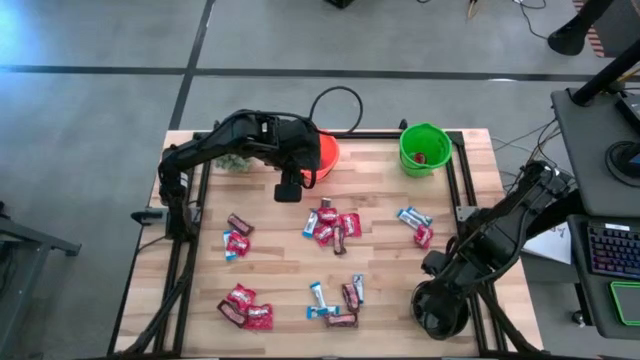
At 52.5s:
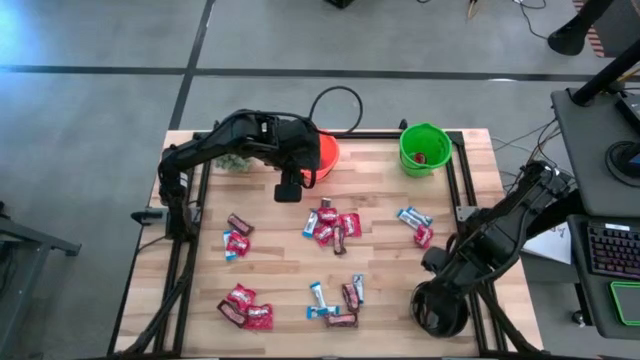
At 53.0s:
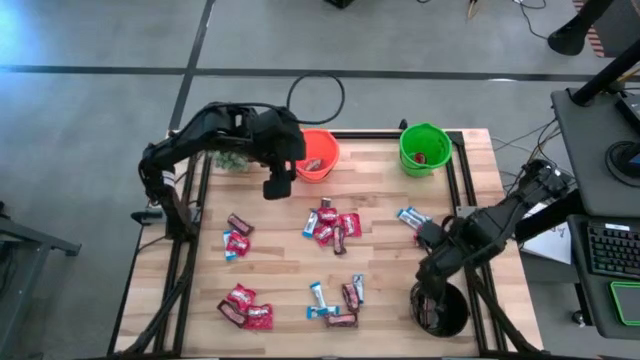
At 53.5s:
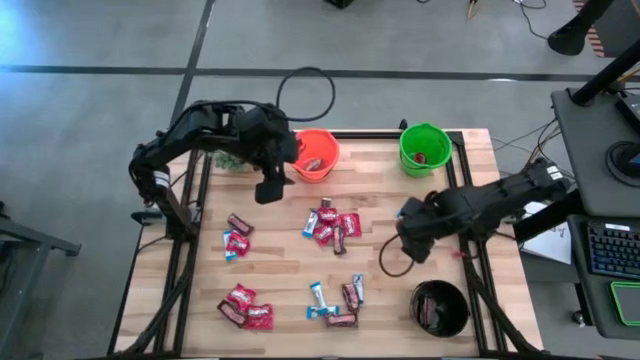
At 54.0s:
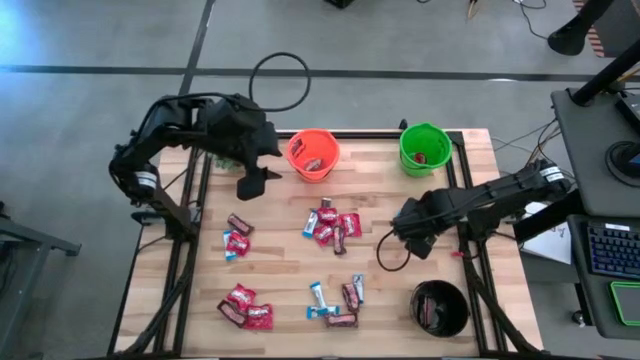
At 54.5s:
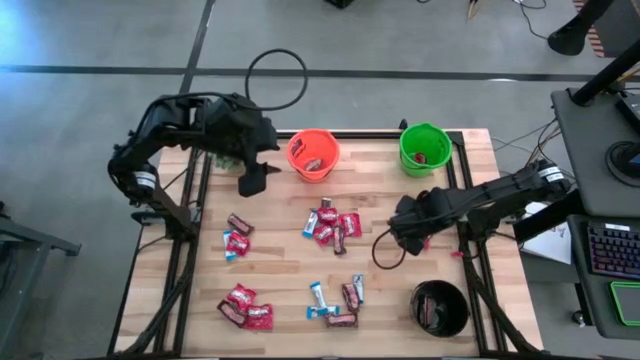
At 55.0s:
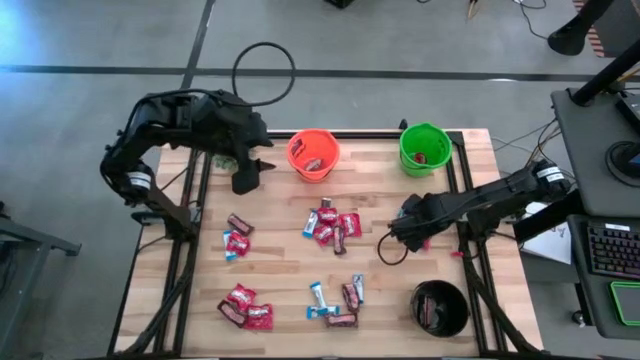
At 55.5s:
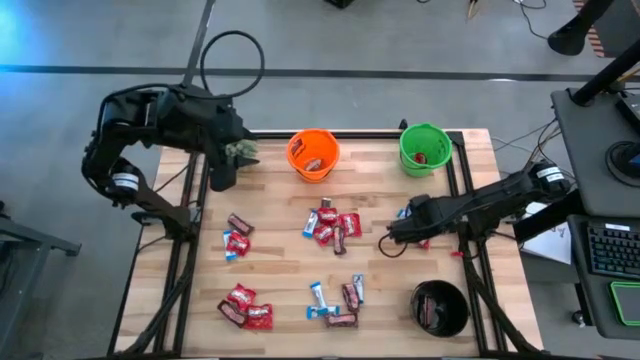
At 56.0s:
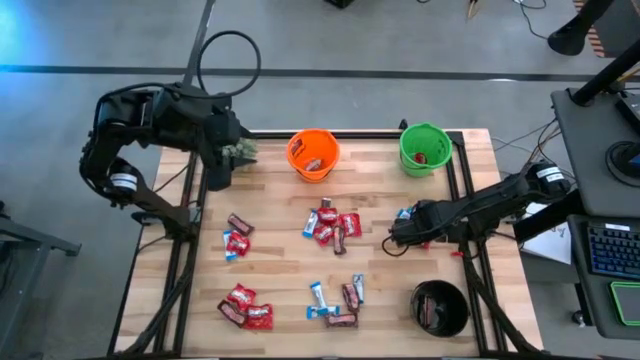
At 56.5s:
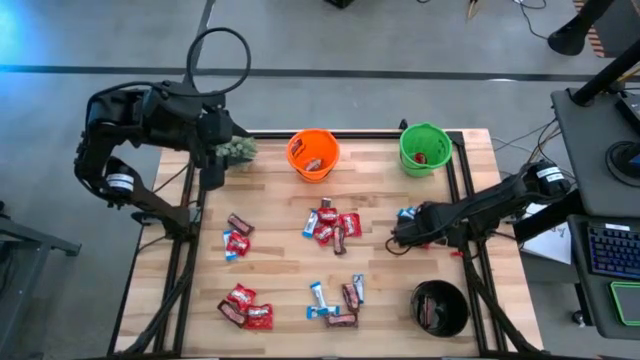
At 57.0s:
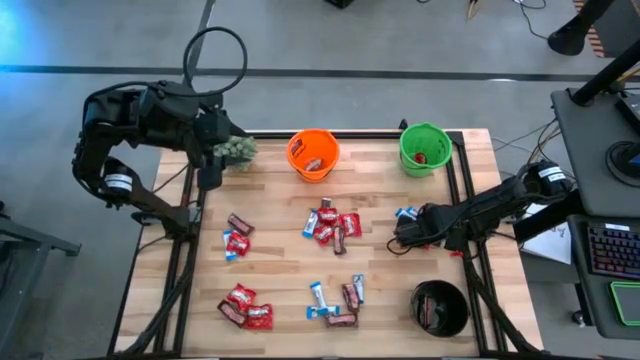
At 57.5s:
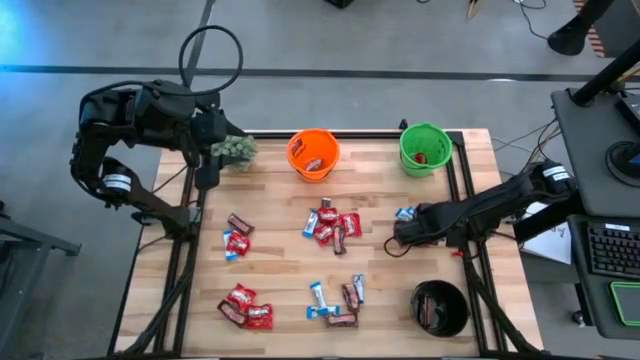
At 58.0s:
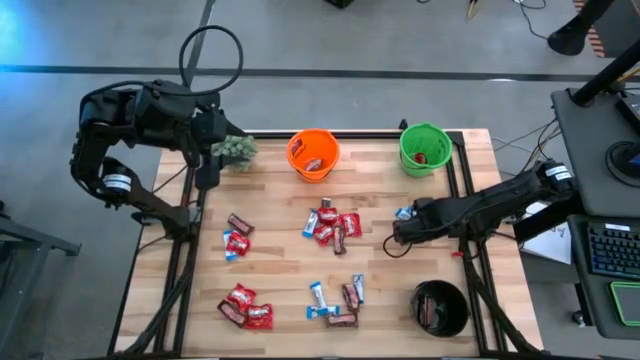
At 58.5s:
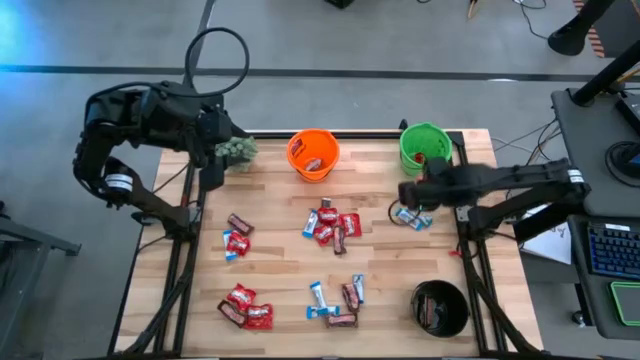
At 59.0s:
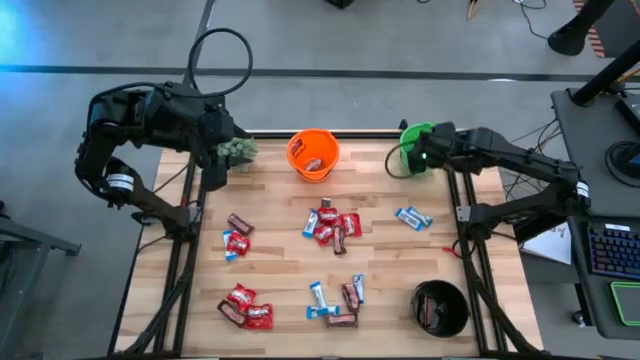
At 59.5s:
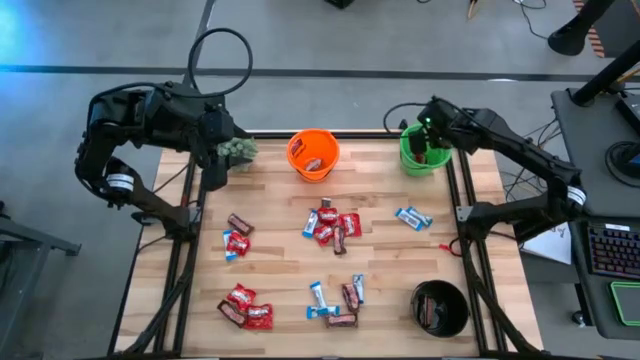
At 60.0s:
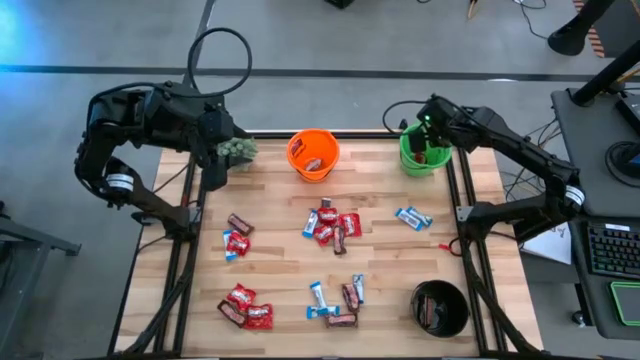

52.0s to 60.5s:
Task: Sort candy
Put the red candy into the green bucket

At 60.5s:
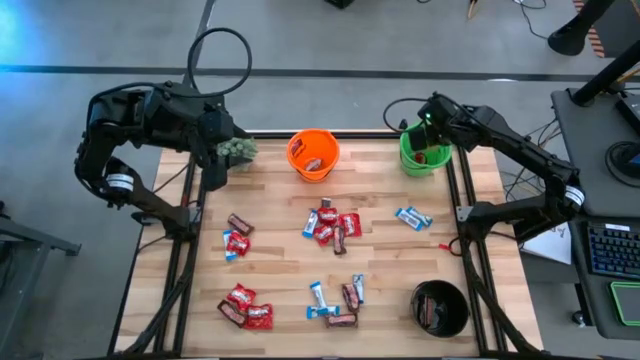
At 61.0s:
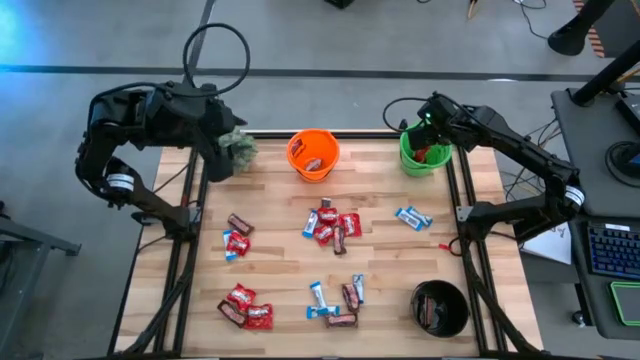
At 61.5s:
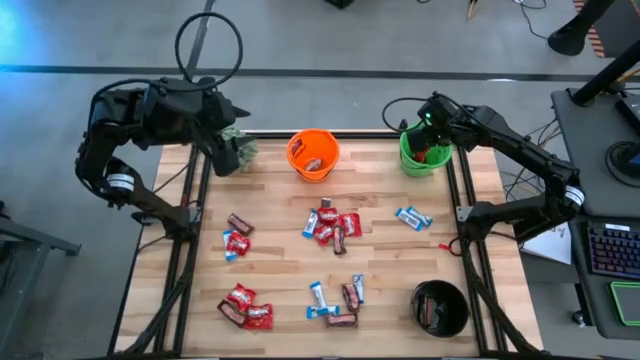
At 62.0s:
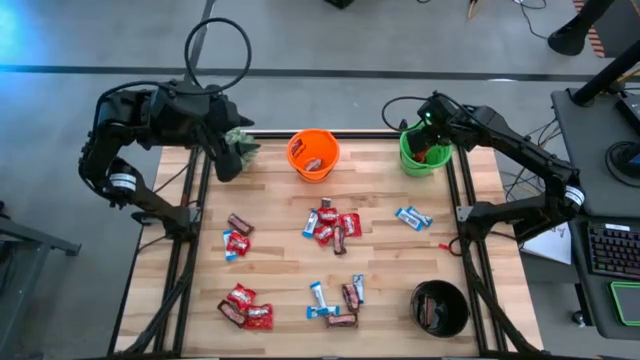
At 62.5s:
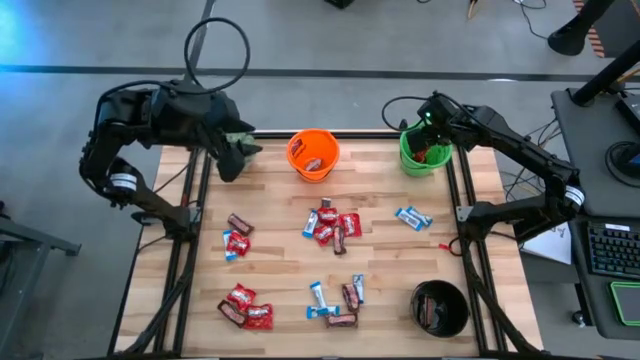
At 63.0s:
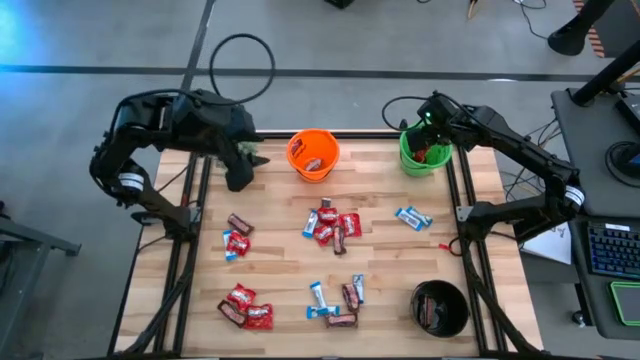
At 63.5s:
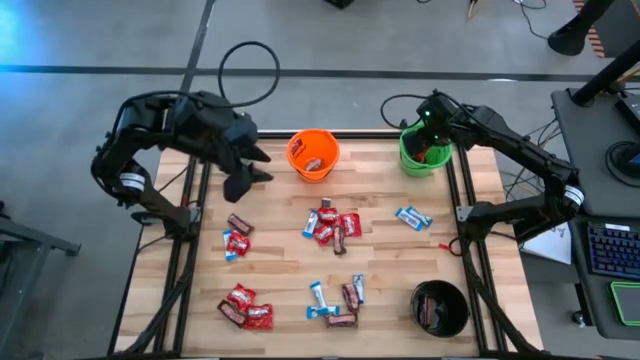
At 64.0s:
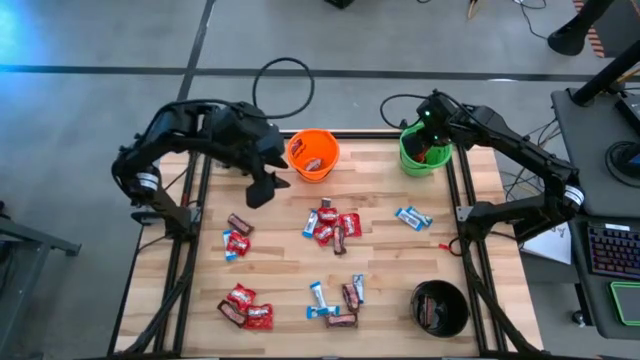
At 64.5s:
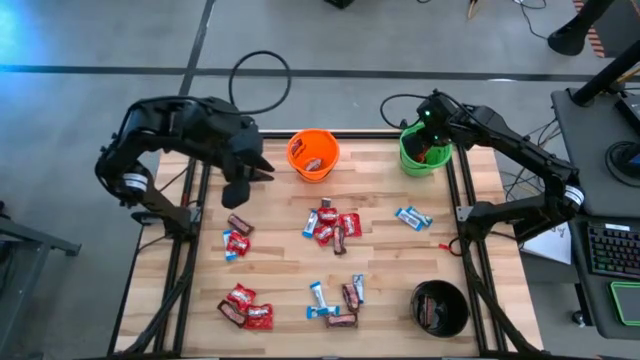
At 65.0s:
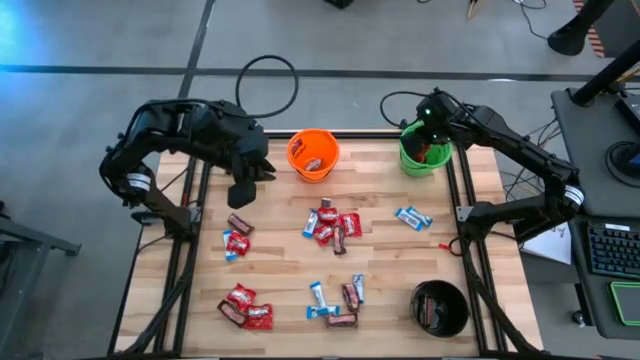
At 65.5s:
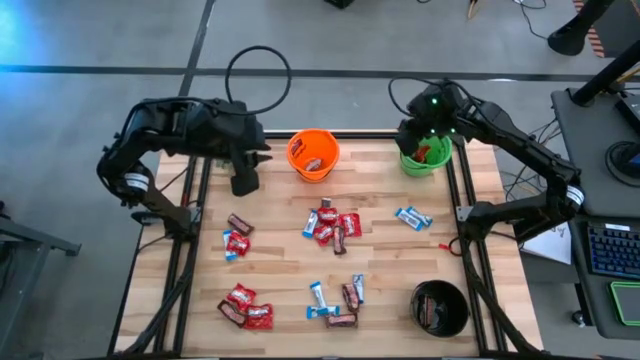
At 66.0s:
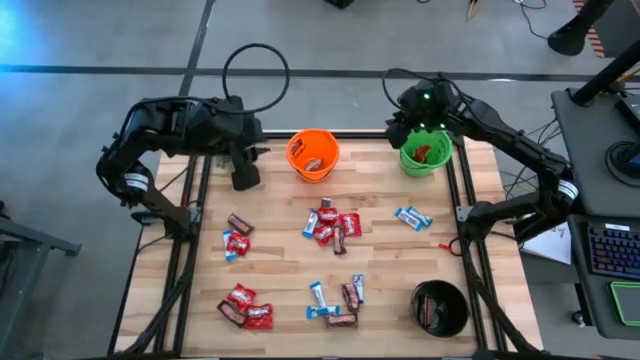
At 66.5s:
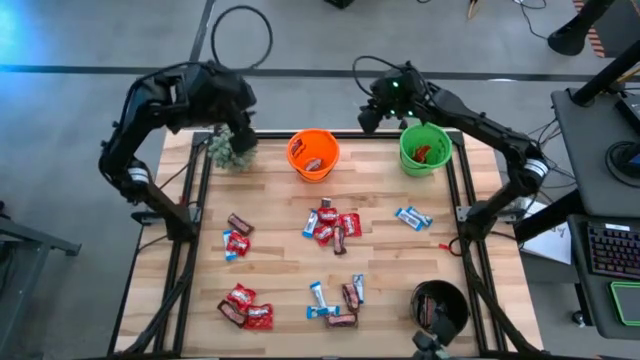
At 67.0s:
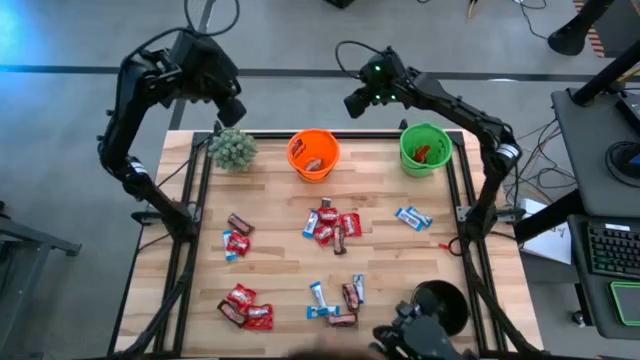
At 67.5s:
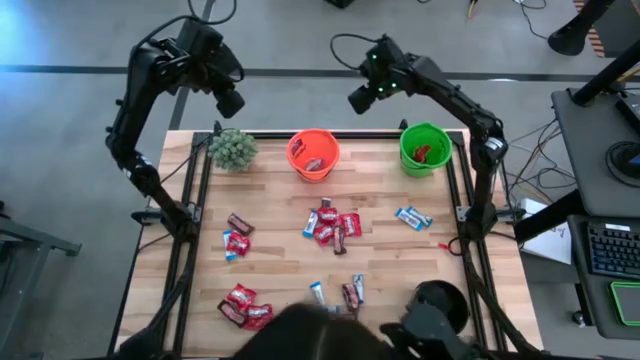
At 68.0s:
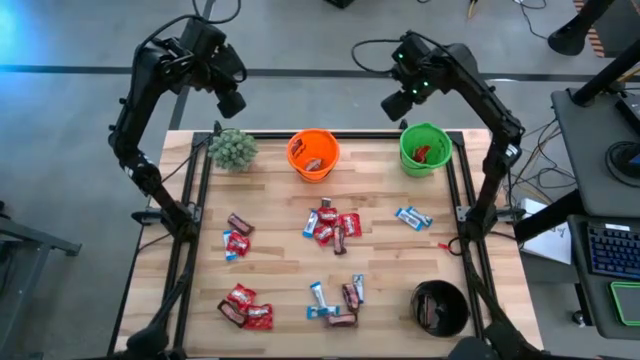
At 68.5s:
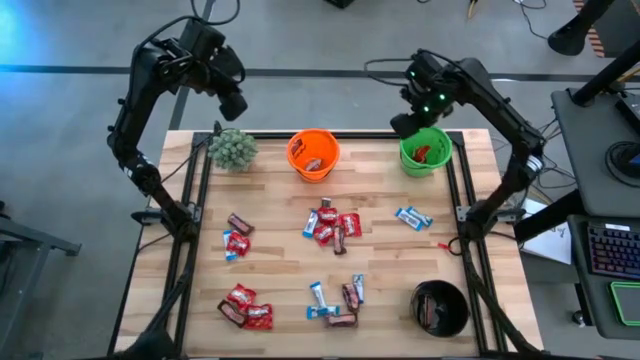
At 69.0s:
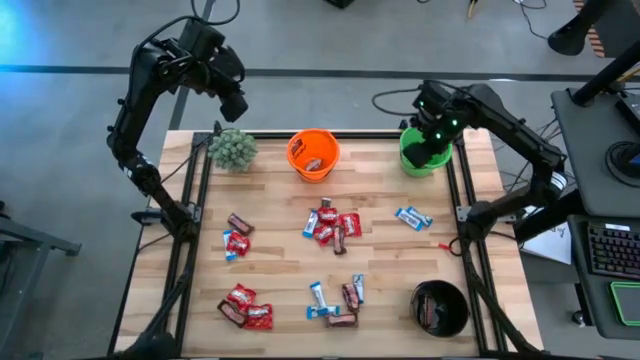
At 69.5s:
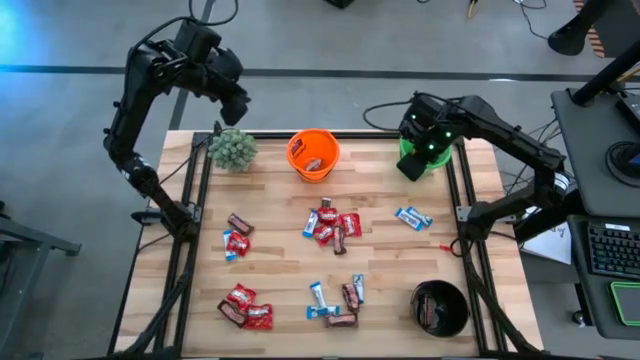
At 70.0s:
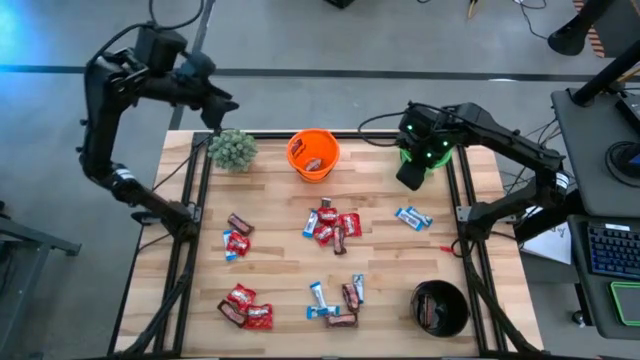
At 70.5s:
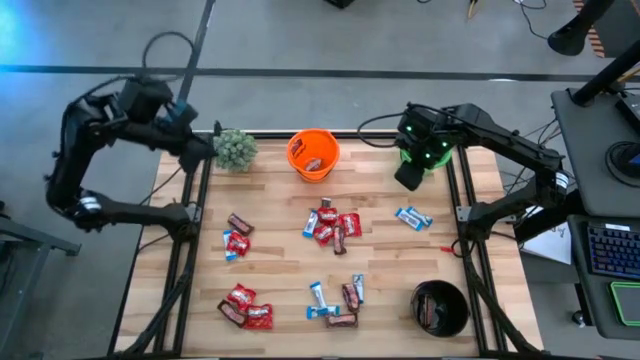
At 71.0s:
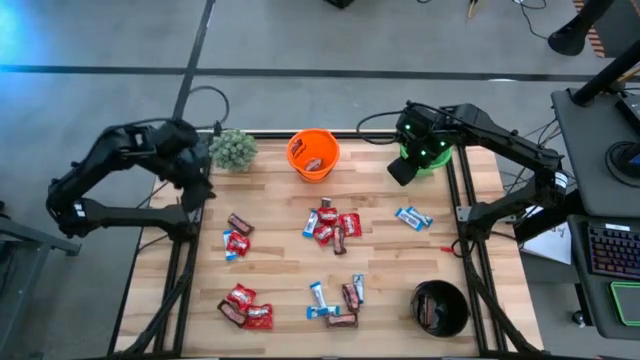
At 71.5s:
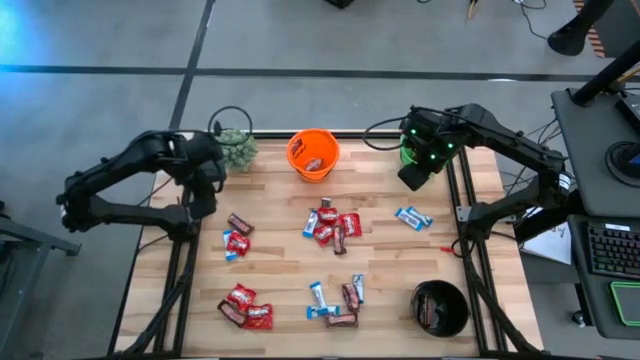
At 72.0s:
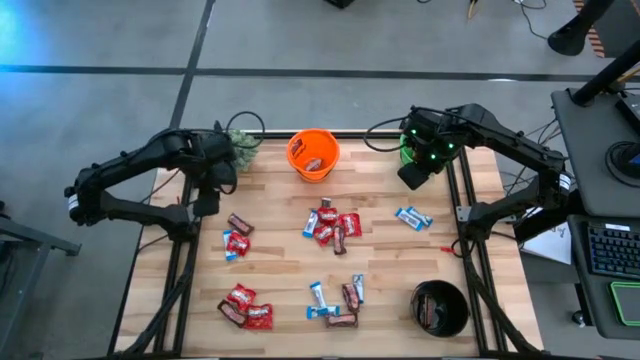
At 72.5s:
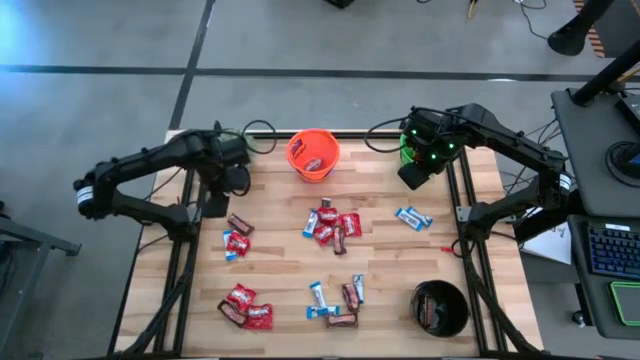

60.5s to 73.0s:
Put the brown chocolate into the black bucket

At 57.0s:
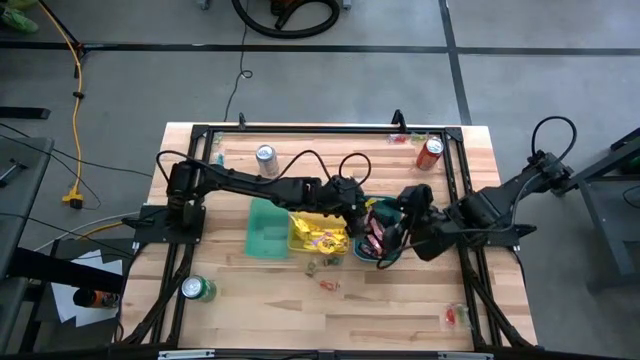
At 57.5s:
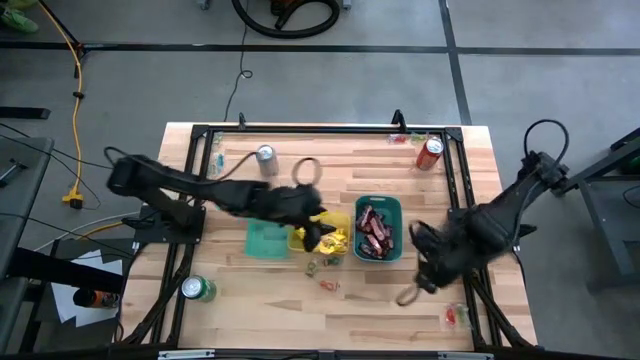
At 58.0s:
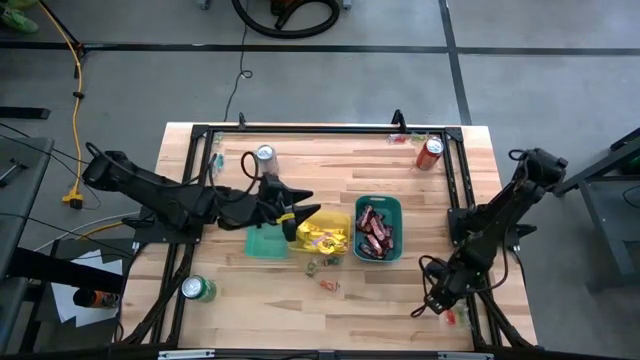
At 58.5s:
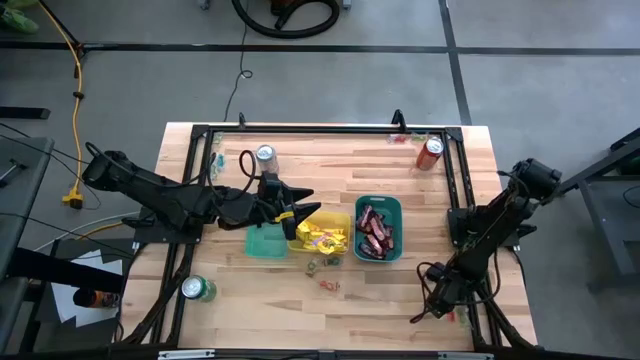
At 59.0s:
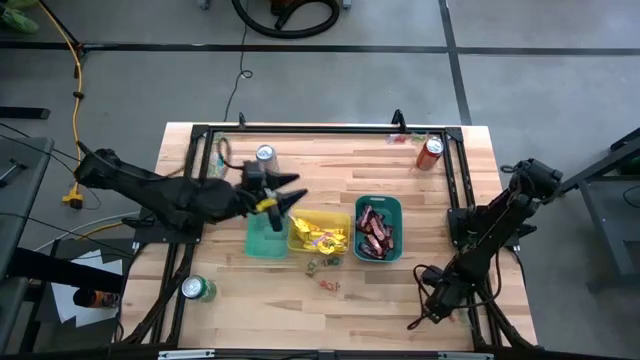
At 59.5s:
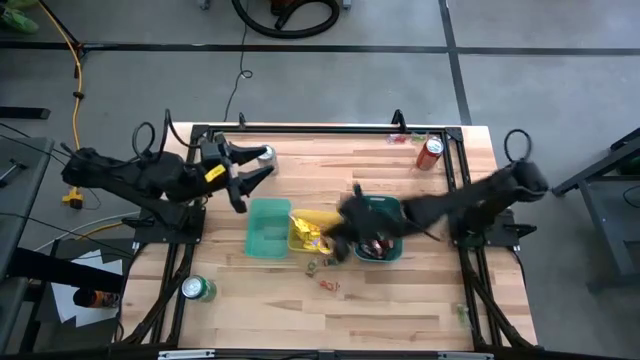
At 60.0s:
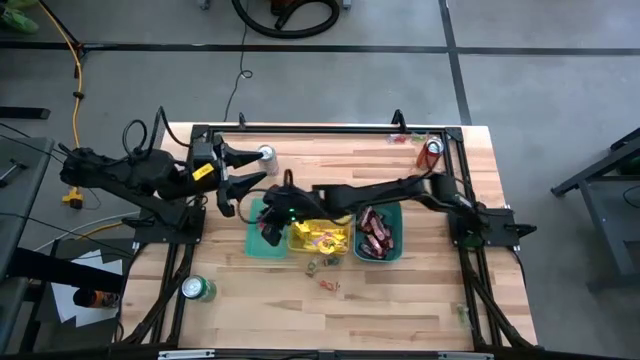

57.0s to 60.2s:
Task: Sort candy
Put the red gummy into the green bin
